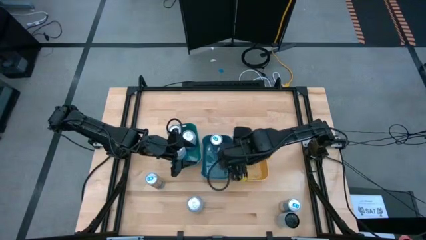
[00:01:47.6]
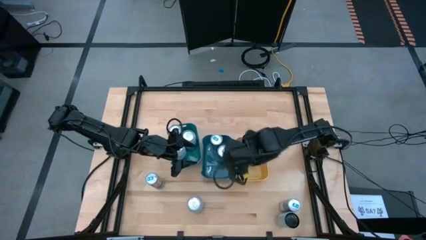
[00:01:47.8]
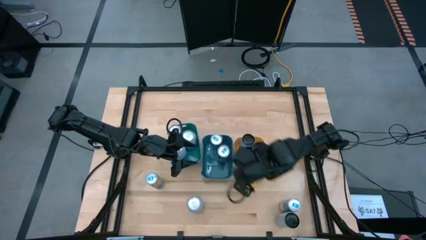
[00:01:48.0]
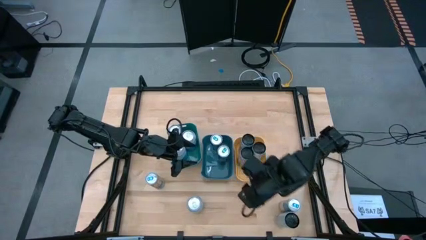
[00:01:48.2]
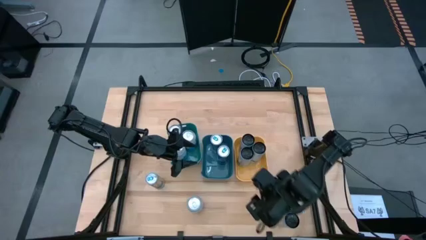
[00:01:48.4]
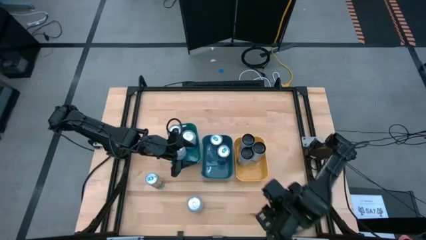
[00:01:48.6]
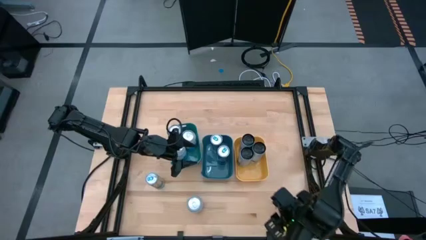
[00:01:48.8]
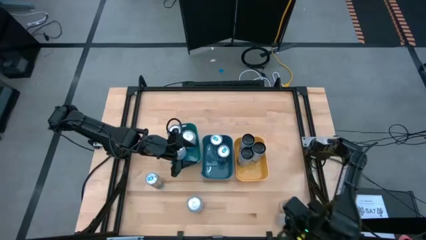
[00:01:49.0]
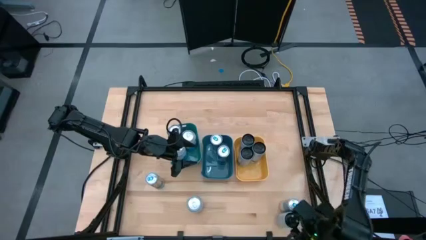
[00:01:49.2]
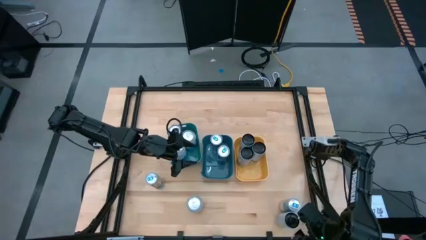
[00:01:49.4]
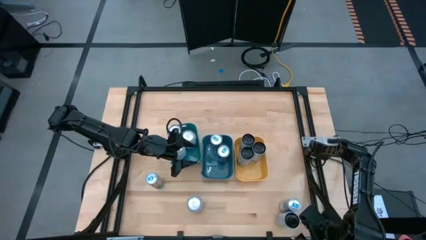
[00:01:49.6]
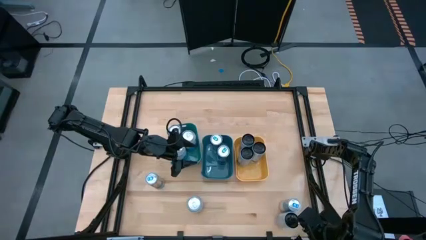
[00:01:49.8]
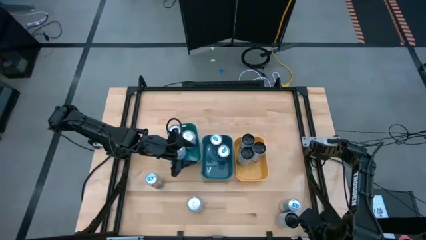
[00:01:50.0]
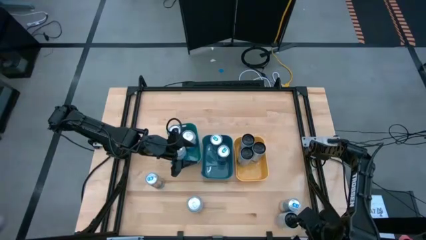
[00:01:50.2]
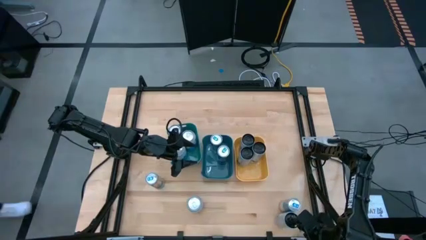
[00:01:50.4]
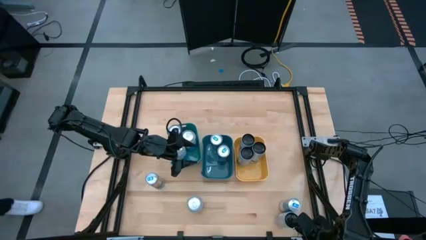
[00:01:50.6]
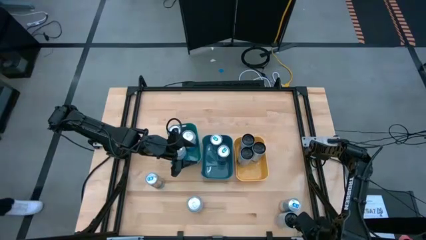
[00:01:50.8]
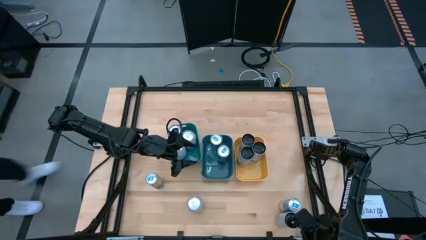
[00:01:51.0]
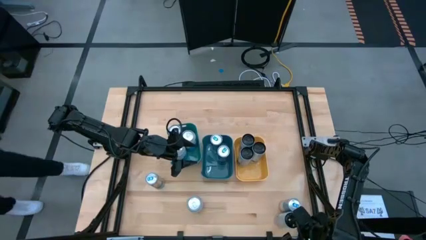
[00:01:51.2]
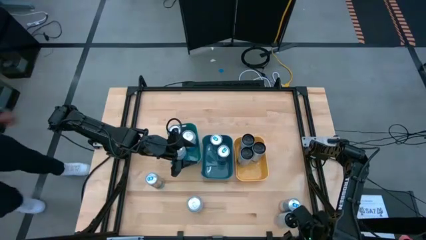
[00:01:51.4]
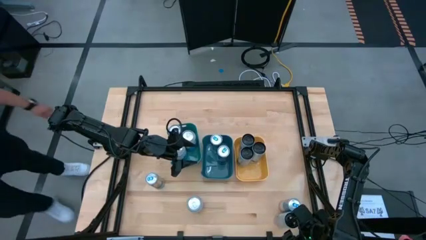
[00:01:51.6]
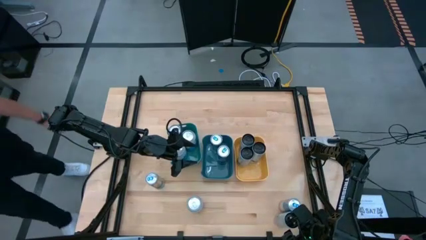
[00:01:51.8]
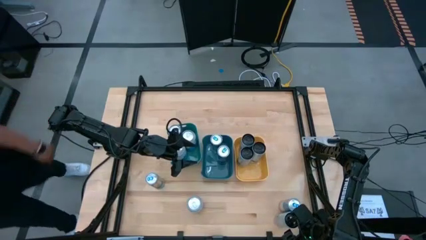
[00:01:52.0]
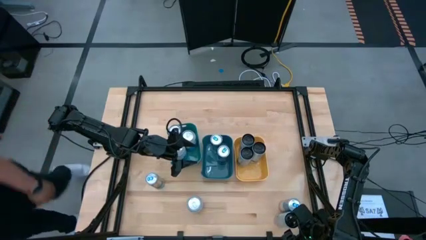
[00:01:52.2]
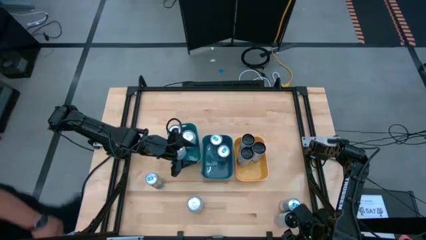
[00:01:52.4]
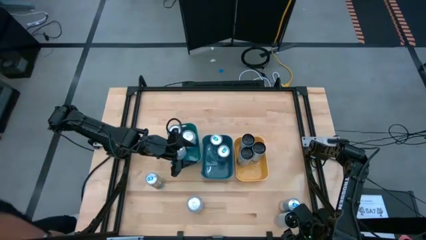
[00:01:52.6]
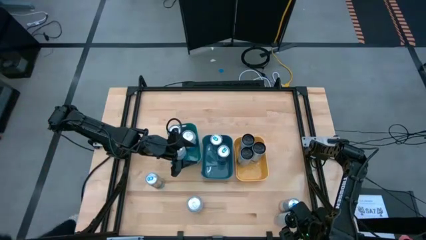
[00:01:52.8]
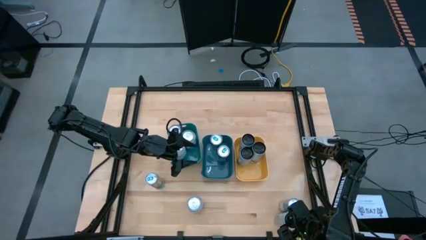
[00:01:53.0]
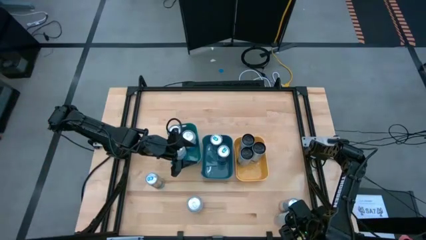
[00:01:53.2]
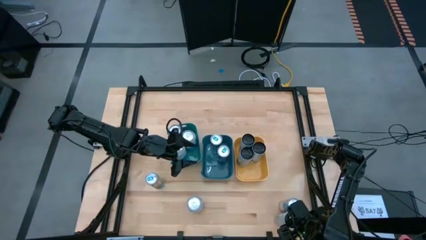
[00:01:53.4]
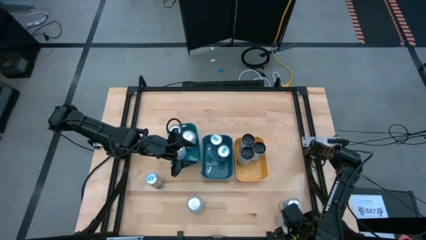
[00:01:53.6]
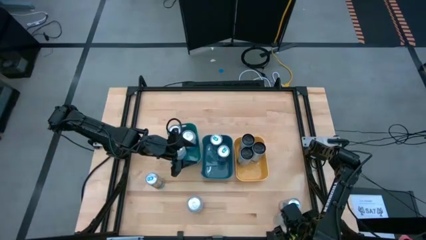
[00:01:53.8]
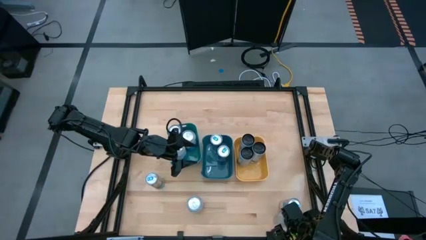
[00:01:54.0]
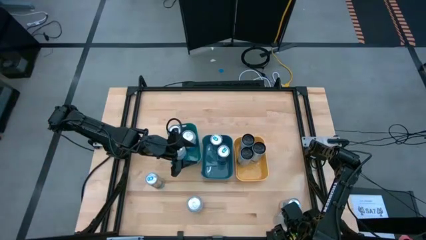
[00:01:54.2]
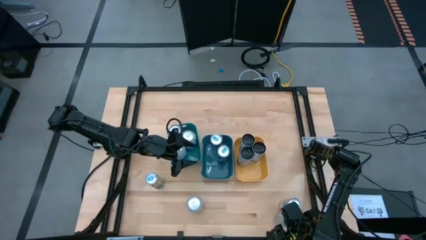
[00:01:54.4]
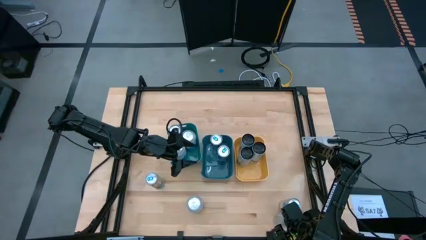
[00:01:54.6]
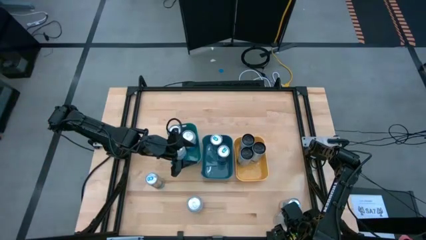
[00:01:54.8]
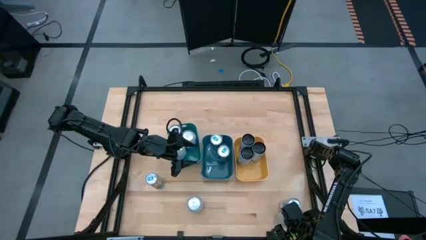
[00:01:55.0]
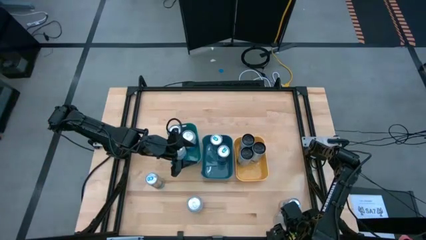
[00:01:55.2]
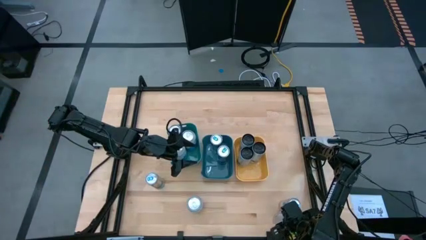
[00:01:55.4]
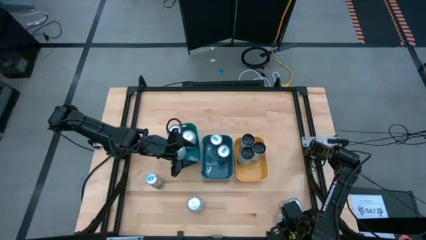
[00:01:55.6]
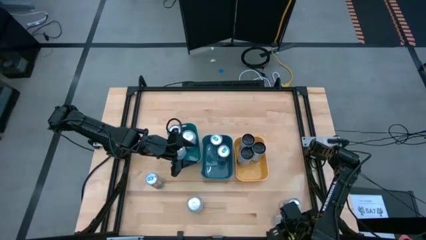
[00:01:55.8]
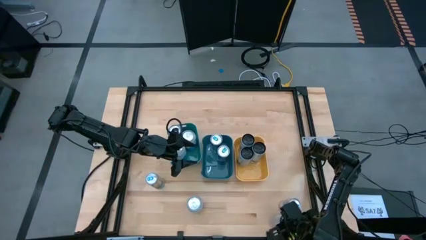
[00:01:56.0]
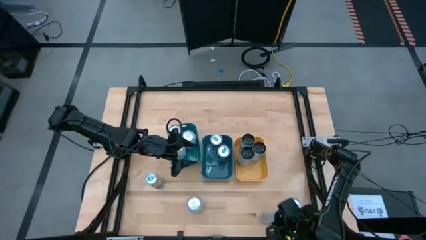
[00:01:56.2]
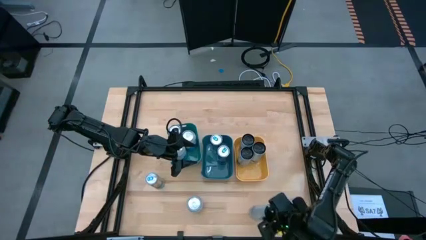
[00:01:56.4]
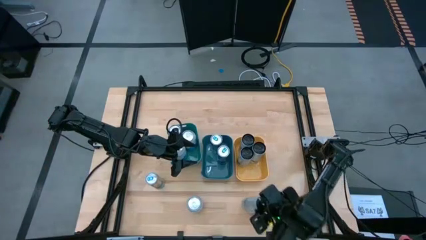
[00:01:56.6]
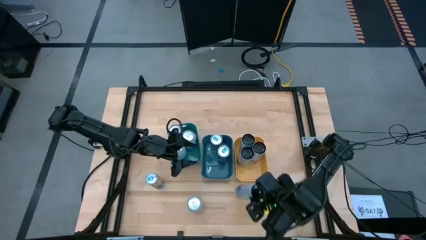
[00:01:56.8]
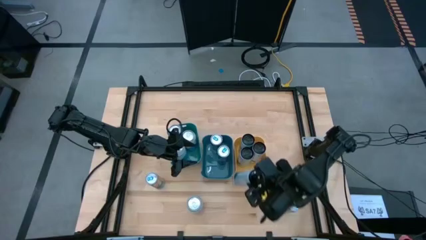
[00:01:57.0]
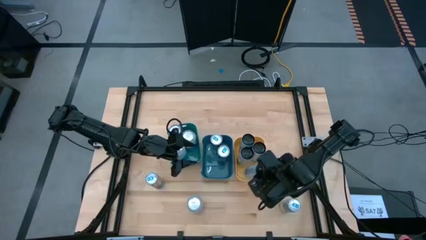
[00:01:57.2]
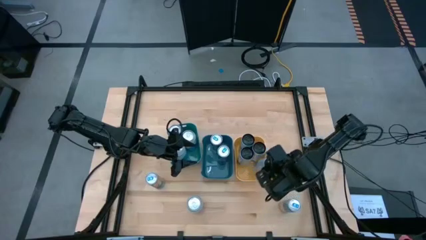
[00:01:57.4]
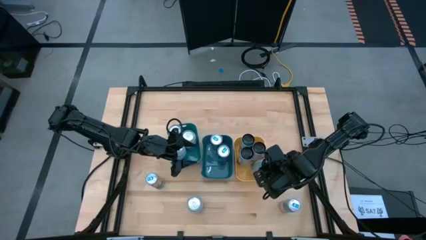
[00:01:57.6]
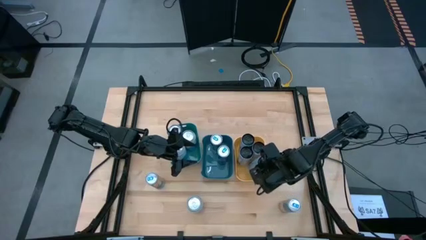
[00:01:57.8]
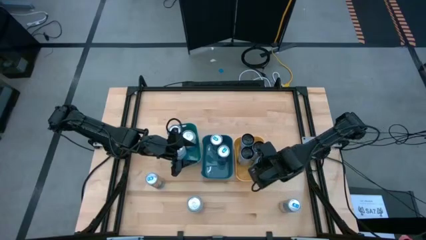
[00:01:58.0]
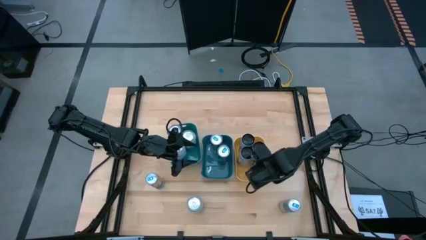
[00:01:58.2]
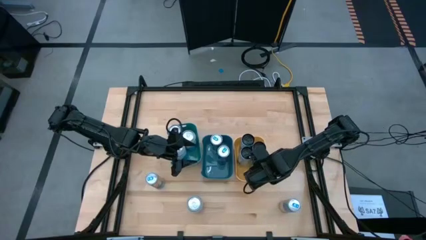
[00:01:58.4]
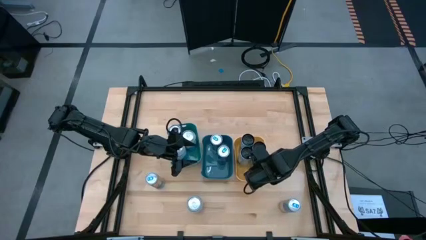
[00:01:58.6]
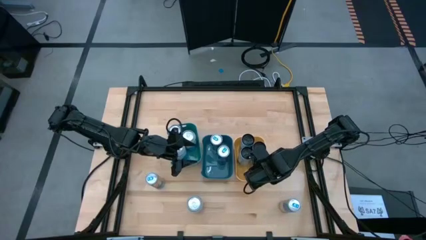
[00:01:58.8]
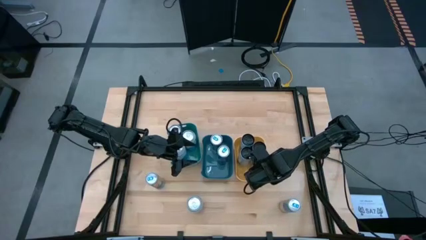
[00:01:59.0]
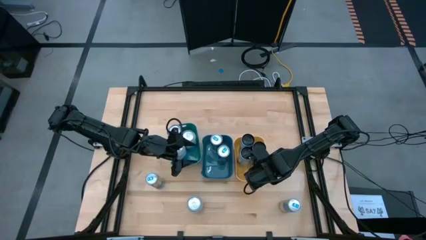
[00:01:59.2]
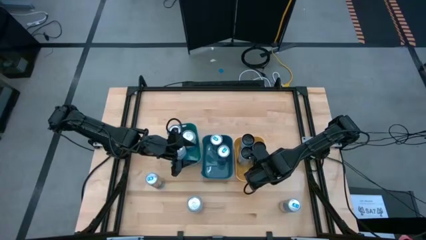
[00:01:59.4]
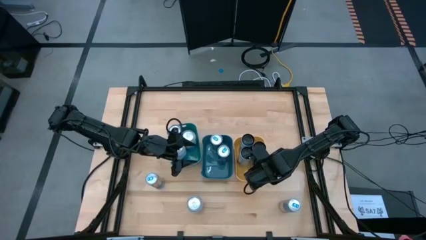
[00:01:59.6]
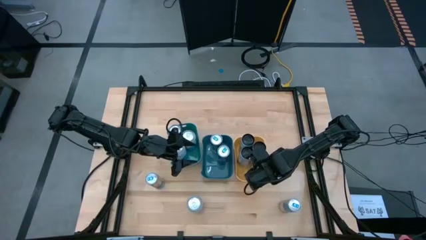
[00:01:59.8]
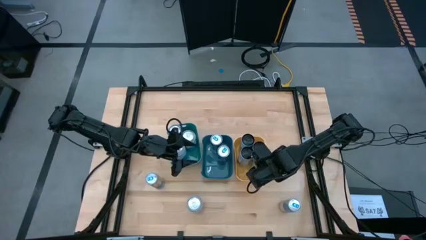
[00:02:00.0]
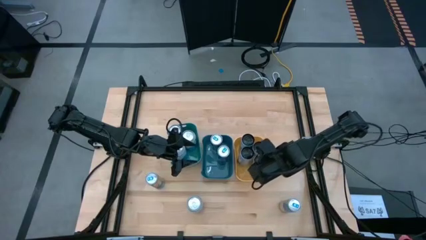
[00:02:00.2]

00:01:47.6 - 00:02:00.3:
Task: Sort soda cans
Put the white-blue soda can into the yellow bin

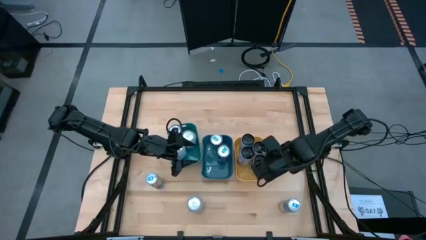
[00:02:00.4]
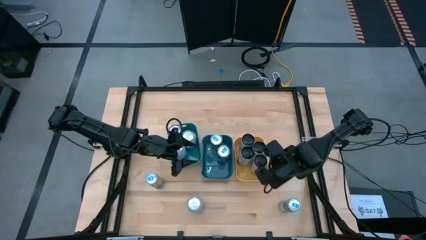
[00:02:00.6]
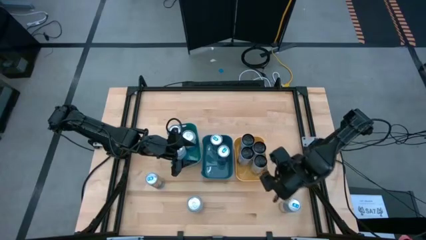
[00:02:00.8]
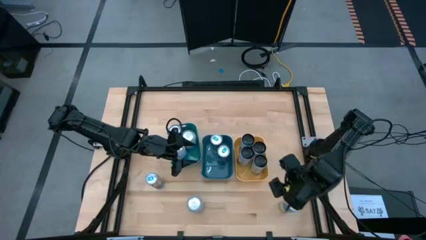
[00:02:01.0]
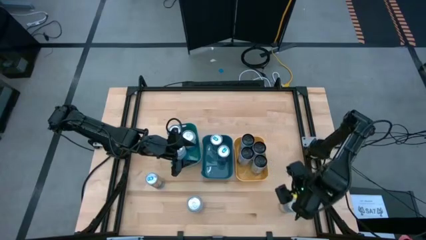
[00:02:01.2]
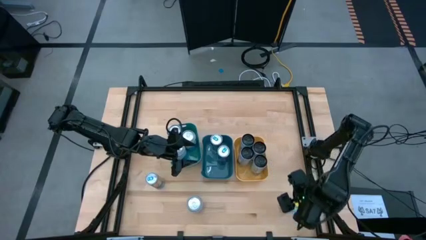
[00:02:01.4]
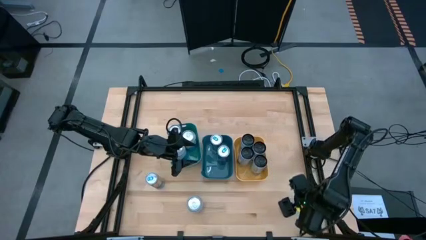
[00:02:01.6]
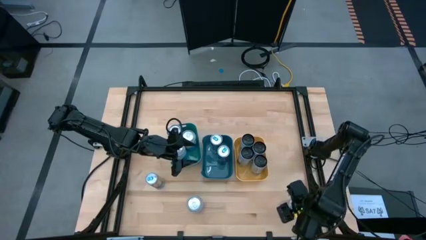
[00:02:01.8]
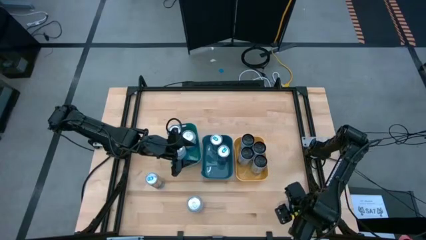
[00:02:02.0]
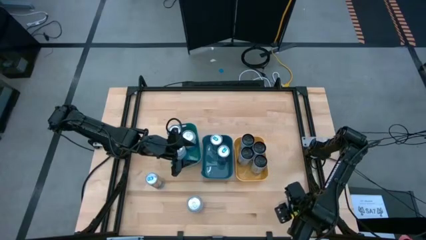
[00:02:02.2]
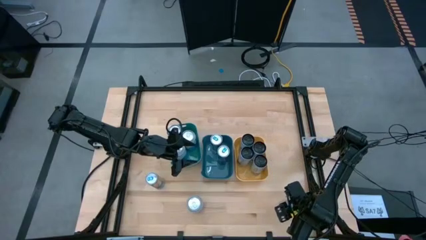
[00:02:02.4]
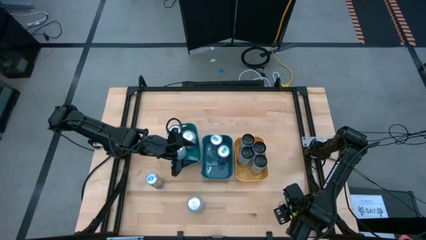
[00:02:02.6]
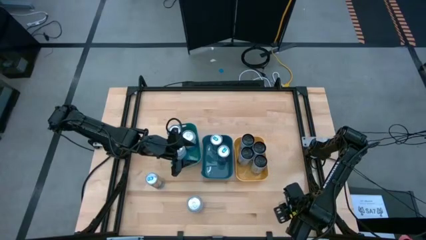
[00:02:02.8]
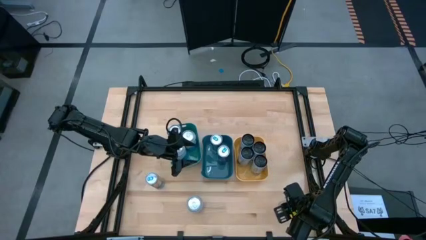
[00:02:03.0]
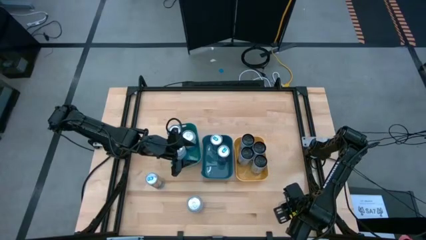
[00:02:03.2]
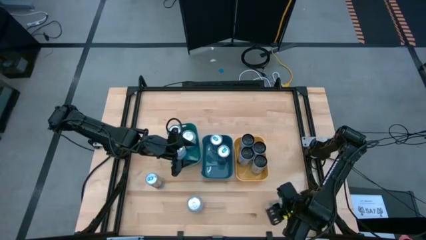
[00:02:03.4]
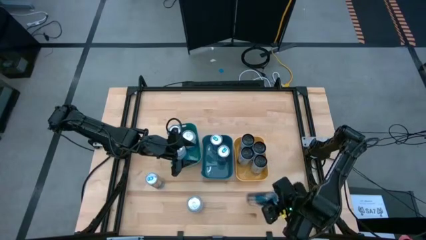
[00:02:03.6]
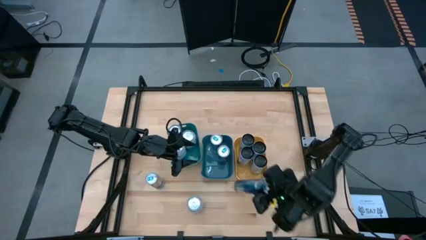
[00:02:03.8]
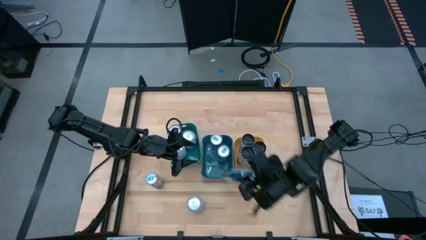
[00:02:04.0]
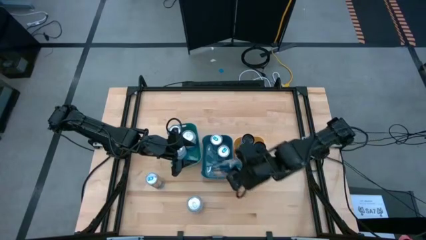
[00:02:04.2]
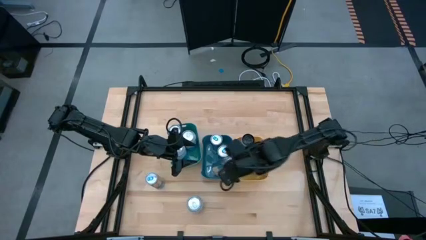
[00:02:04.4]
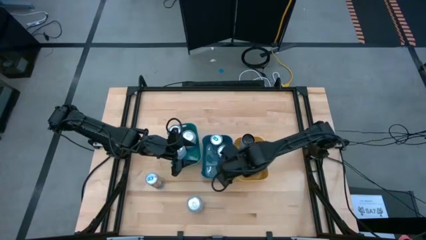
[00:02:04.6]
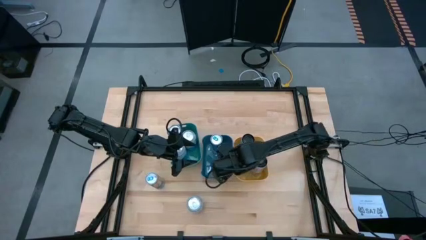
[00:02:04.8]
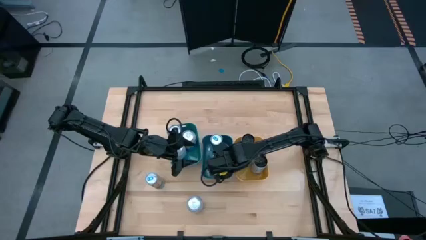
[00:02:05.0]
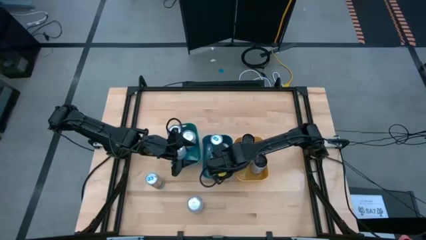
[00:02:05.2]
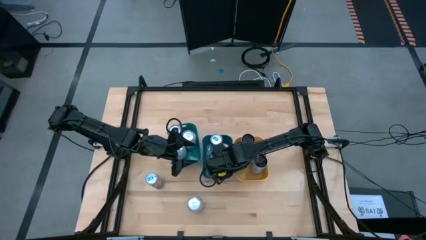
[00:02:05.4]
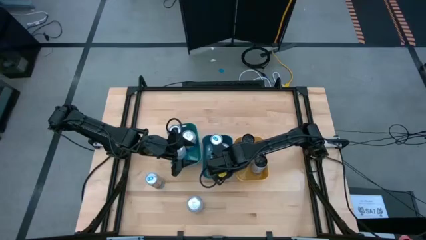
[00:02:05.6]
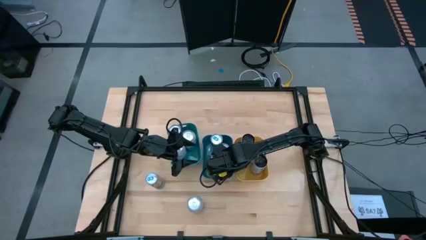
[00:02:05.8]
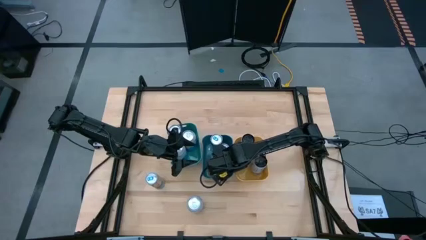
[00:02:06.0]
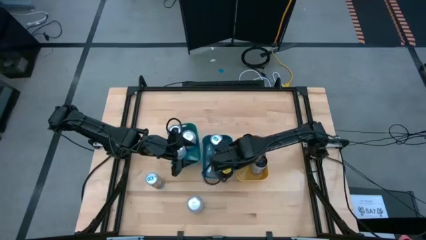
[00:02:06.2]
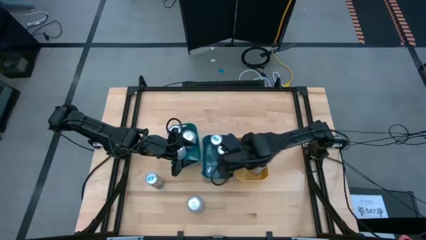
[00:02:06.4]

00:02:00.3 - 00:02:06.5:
Put the blue soda can into the blue bin
